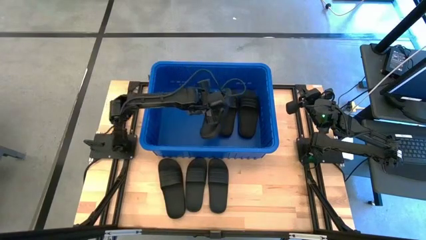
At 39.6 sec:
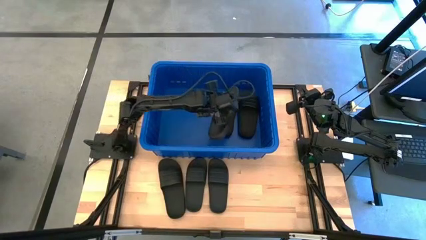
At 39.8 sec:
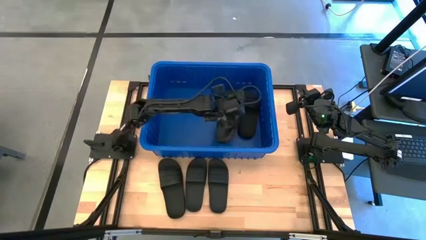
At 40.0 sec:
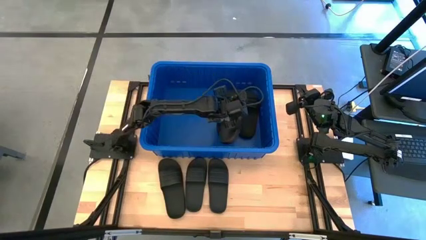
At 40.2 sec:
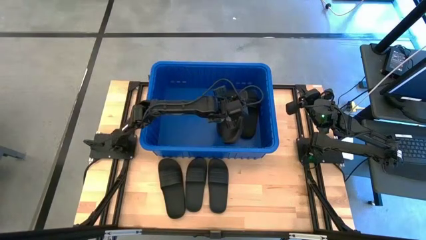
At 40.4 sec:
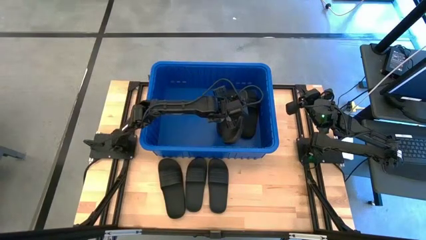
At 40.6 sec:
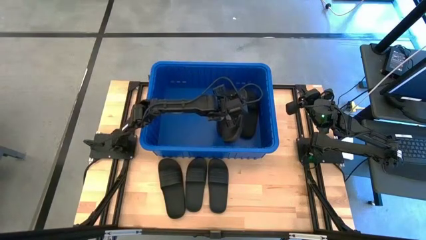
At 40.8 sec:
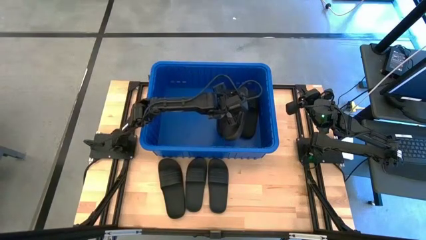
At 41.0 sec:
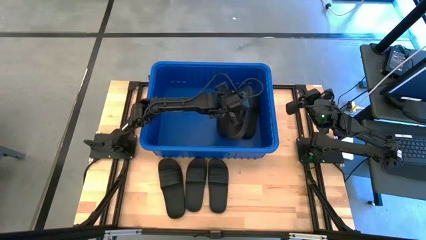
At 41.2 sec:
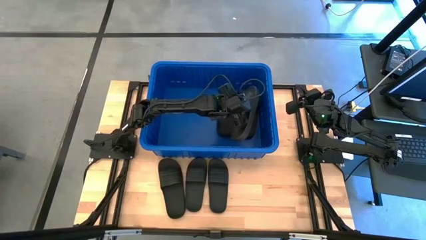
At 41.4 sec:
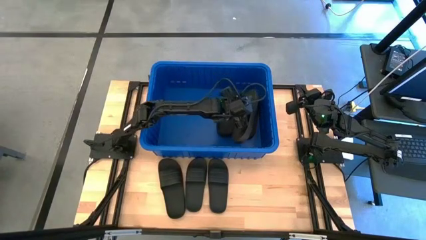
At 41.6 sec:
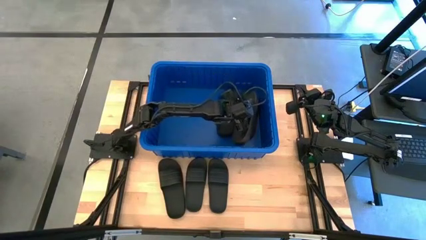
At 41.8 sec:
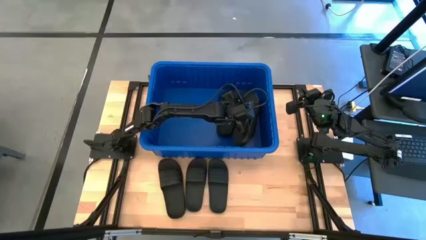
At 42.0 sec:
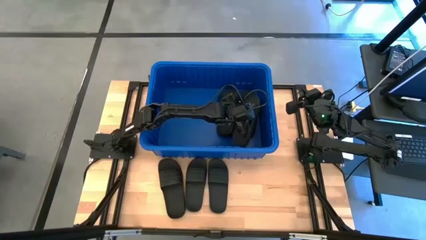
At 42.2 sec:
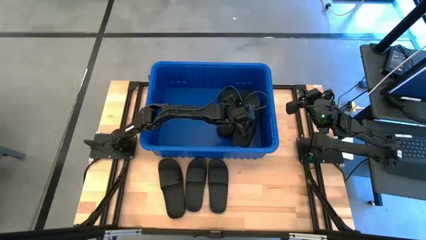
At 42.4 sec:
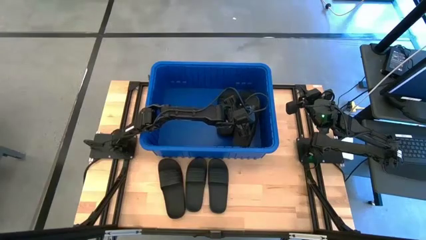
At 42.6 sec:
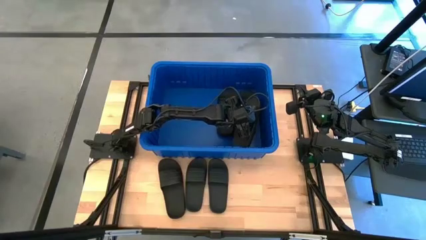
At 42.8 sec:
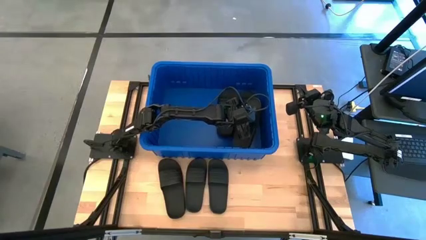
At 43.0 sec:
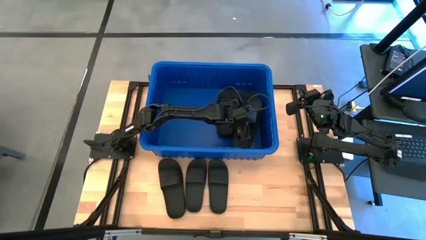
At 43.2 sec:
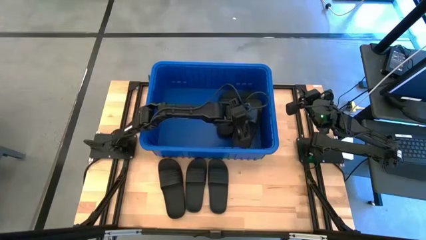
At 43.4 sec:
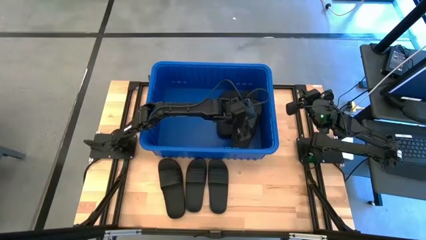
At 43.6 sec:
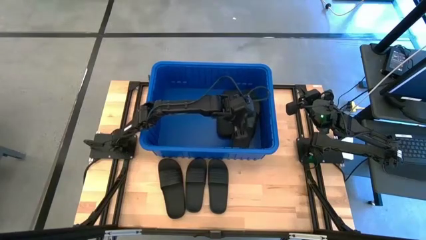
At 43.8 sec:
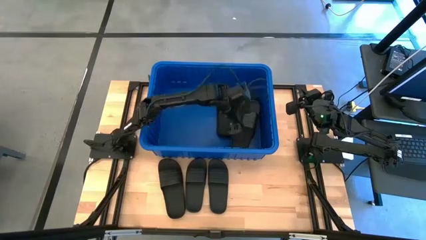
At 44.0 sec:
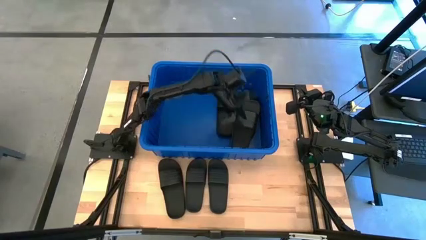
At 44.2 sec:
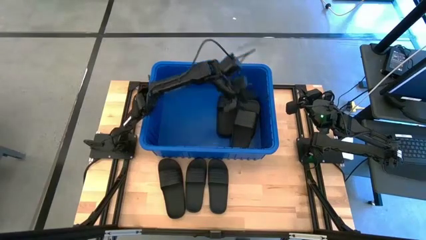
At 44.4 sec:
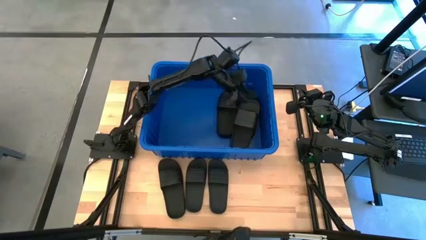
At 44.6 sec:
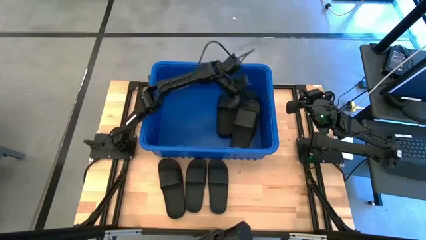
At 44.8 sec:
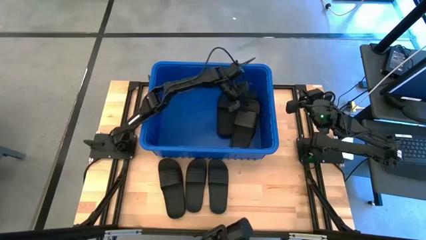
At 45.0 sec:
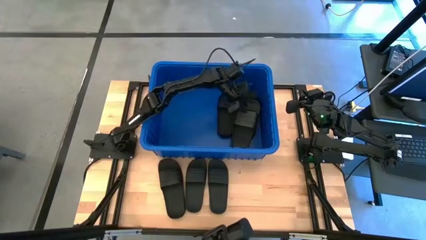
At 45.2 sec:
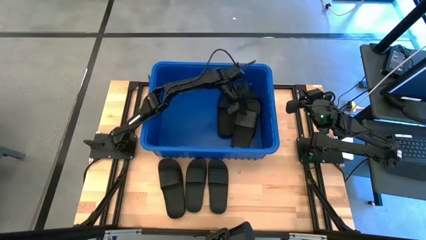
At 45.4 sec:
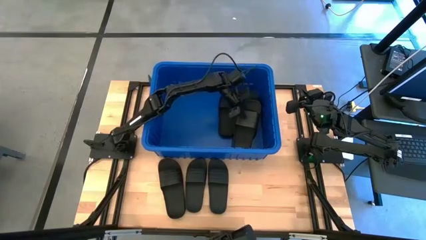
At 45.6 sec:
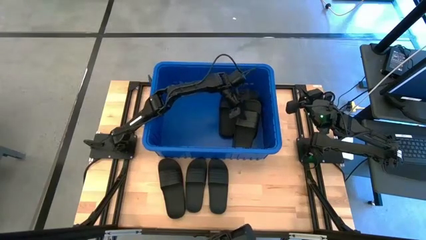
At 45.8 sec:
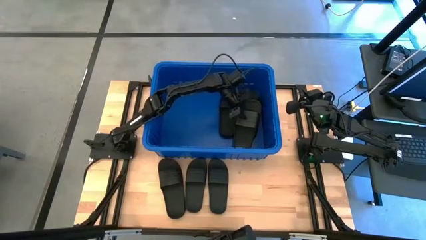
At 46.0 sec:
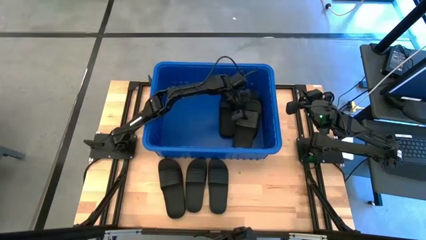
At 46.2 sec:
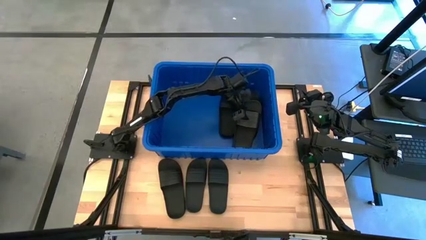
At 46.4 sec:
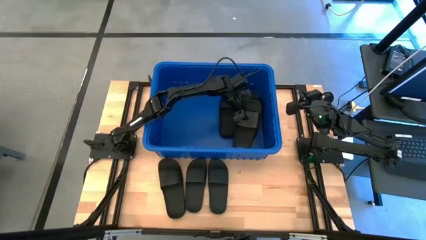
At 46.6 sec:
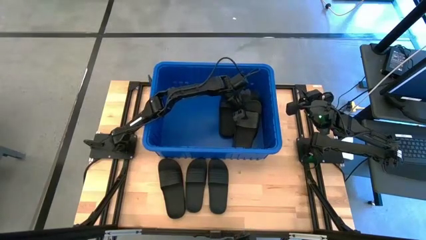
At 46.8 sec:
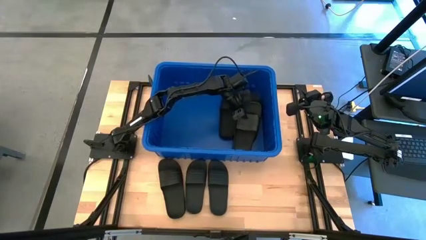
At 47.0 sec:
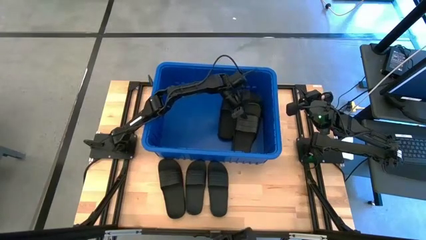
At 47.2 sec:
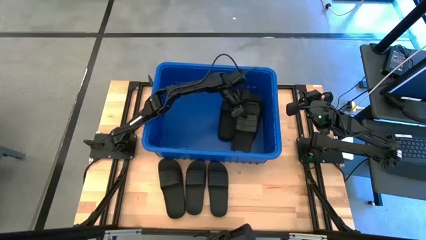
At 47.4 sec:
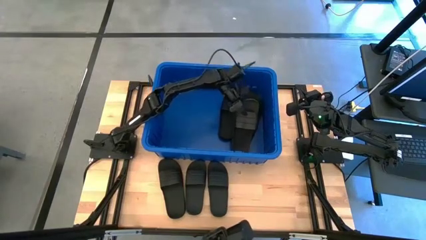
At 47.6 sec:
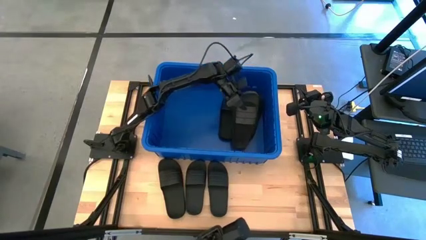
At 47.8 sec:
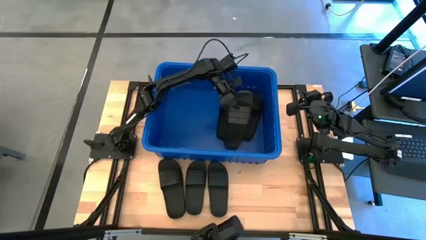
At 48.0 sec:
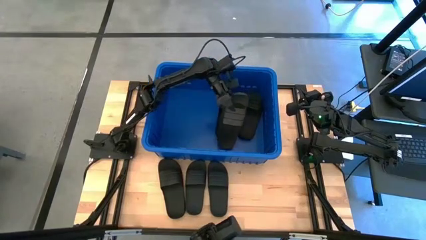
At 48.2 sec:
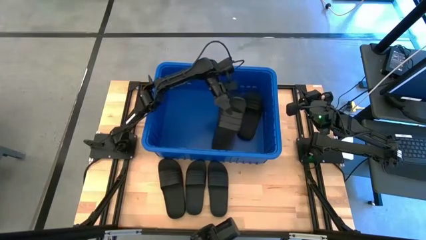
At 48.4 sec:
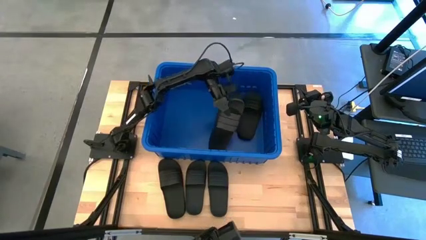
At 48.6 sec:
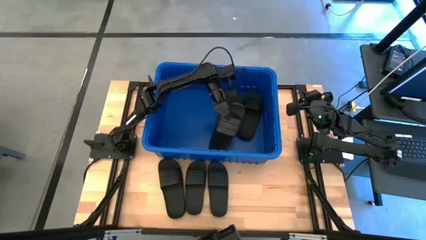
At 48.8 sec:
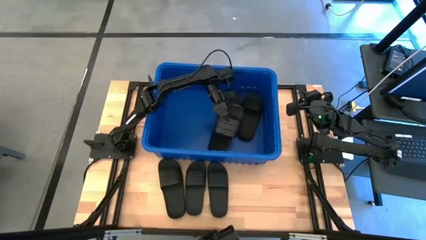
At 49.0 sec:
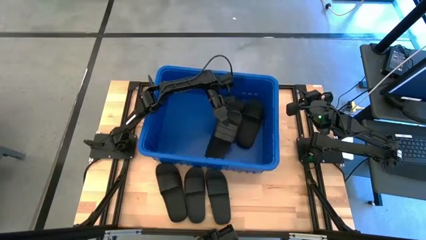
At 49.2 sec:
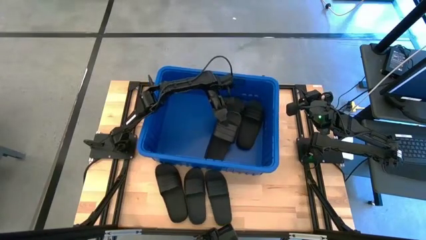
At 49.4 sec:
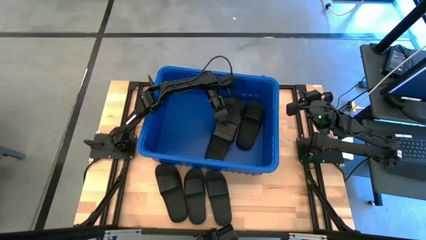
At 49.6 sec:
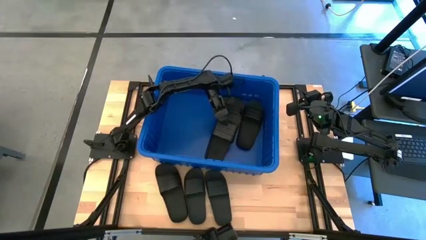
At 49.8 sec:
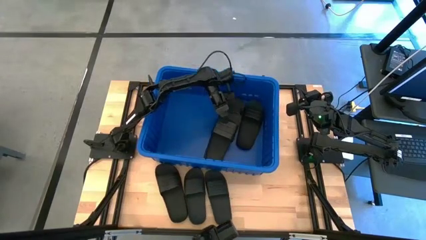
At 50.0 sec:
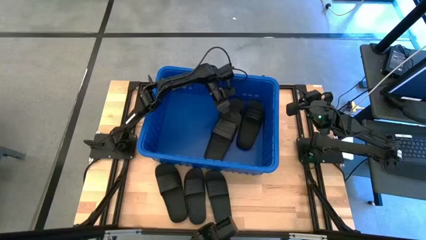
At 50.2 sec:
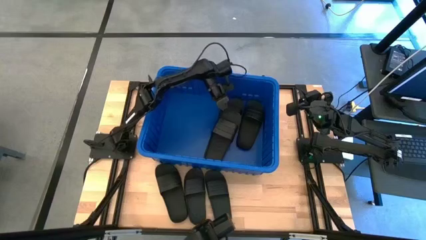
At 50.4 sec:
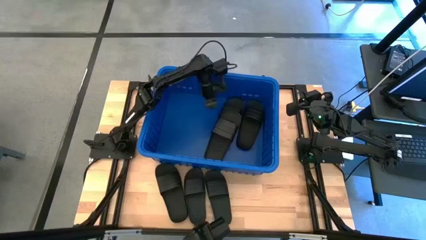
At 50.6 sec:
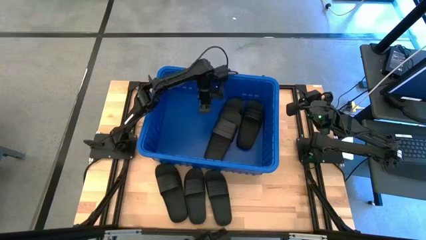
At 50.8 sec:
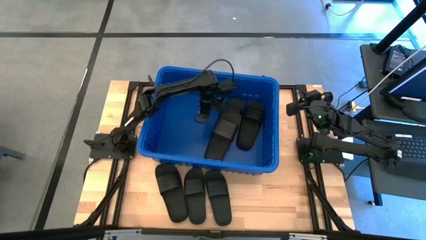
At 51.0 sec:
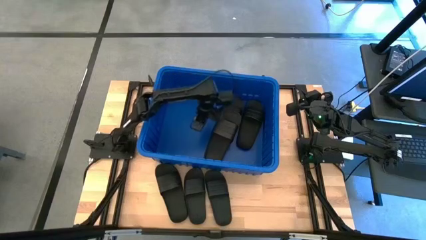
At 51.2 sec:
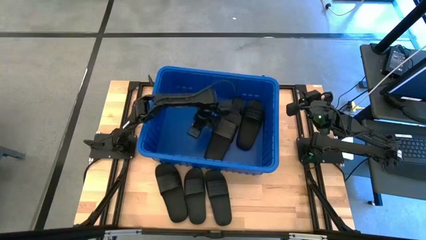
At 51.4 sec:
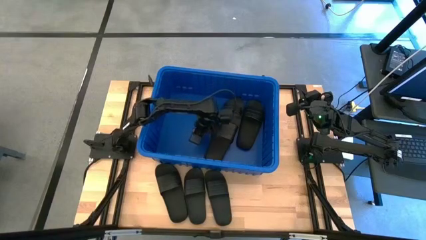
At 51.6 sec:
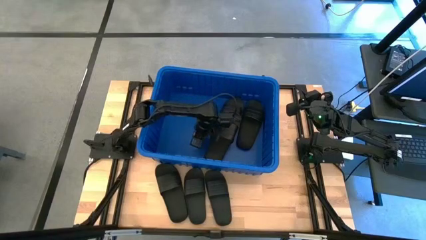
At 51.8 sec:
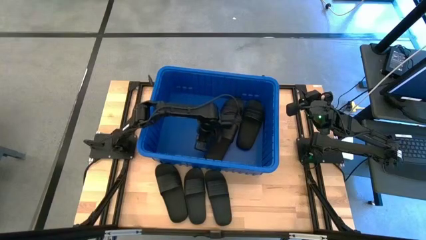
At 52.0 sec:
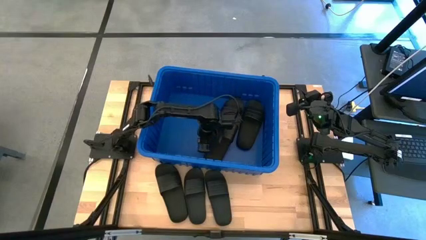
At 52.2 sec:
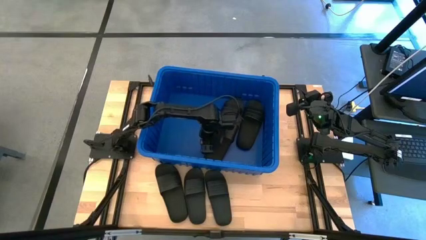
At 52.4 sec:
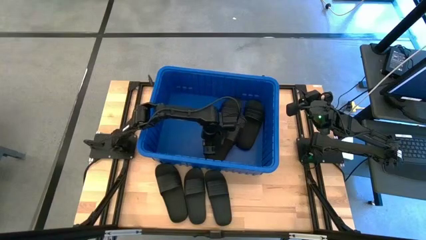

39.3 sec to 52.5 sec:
Task: Pick and place slides into bin
Put the black slides into the blue organizer bin
